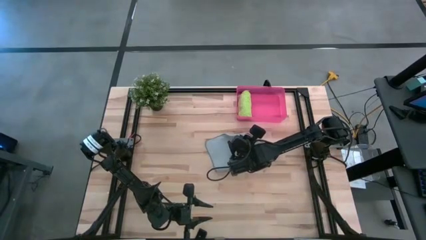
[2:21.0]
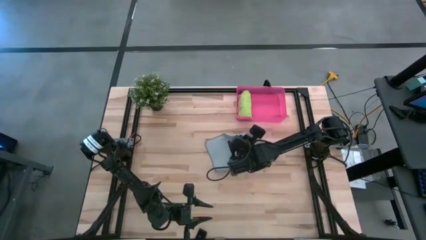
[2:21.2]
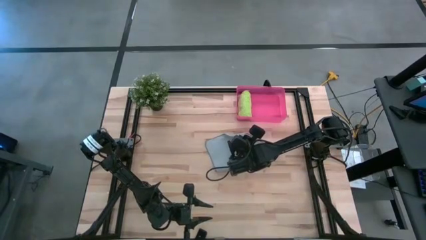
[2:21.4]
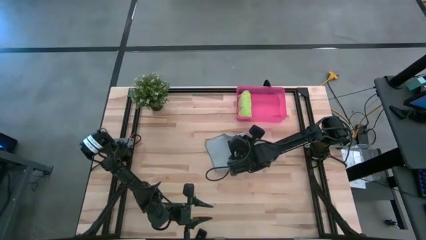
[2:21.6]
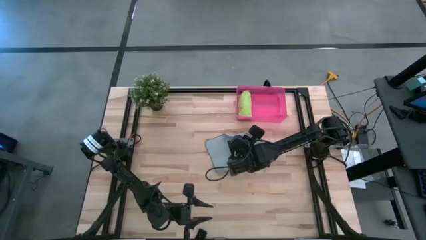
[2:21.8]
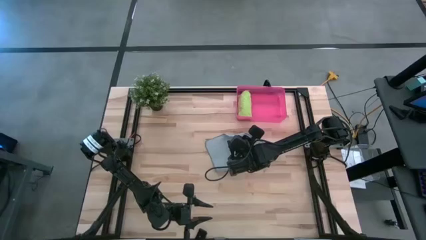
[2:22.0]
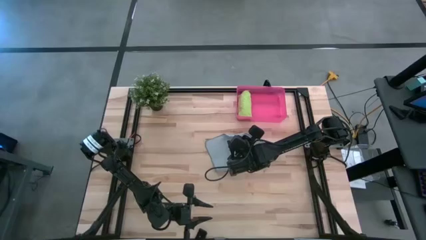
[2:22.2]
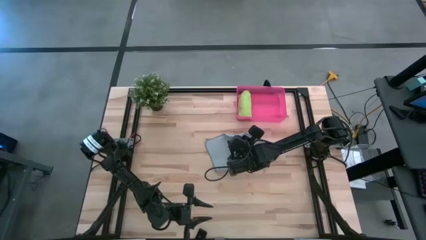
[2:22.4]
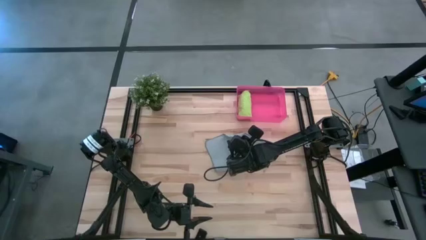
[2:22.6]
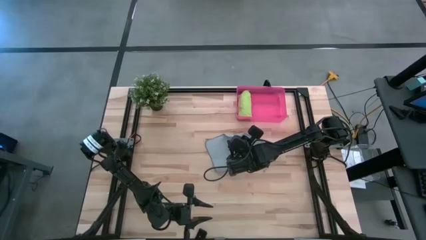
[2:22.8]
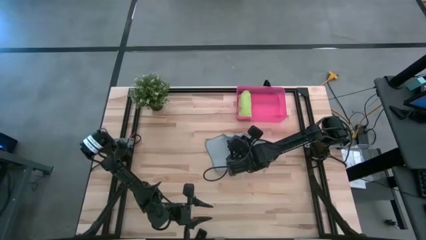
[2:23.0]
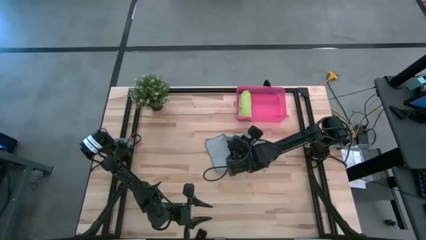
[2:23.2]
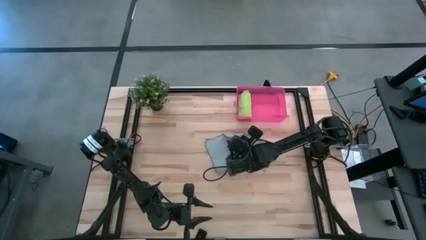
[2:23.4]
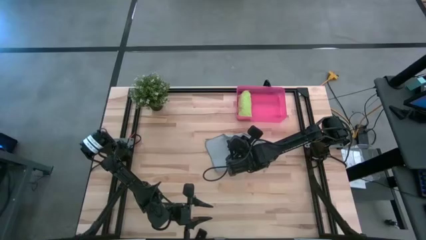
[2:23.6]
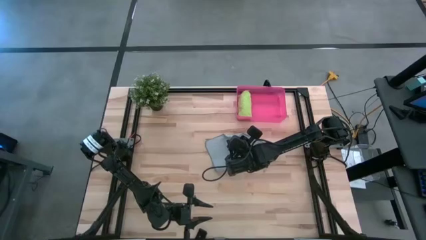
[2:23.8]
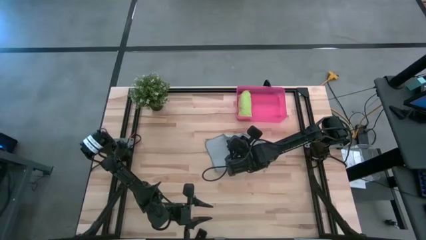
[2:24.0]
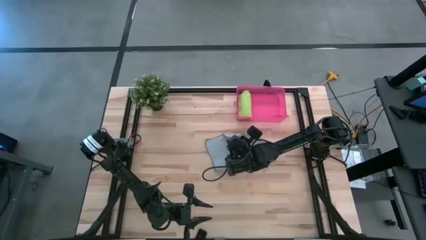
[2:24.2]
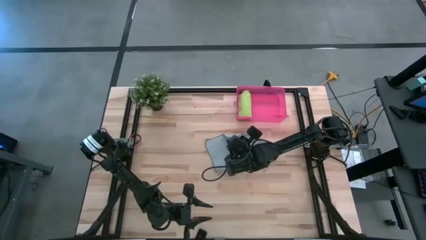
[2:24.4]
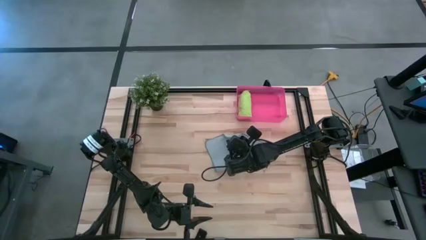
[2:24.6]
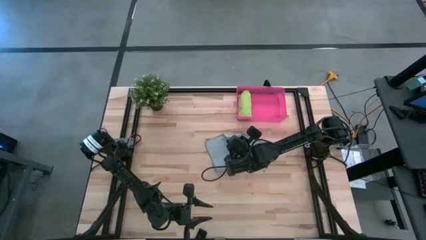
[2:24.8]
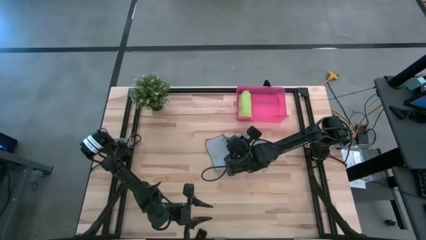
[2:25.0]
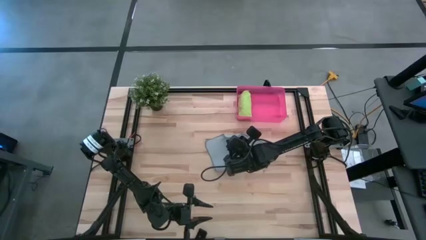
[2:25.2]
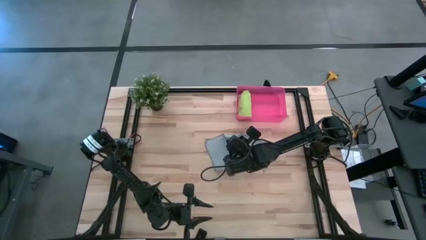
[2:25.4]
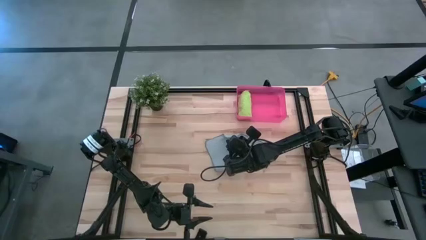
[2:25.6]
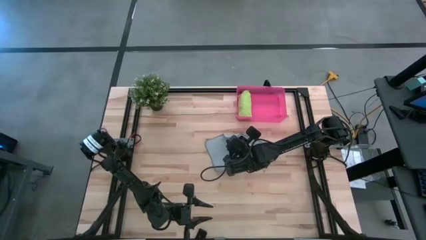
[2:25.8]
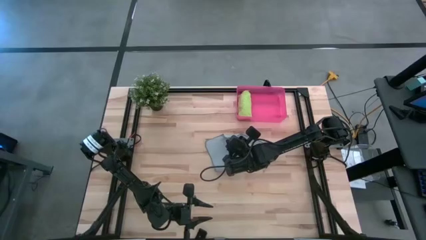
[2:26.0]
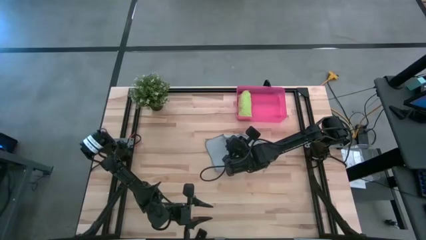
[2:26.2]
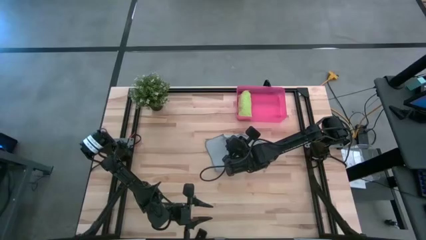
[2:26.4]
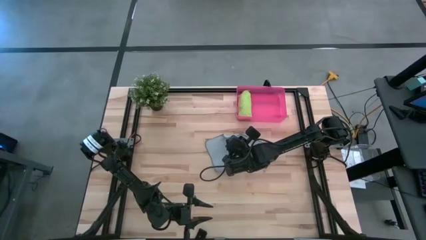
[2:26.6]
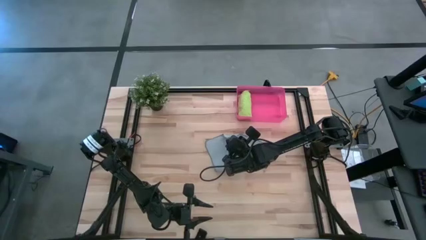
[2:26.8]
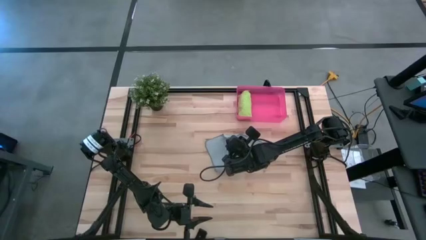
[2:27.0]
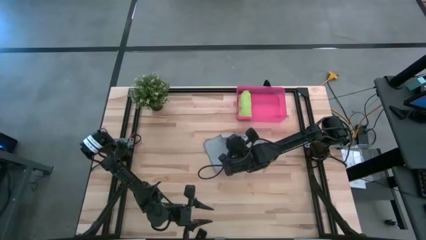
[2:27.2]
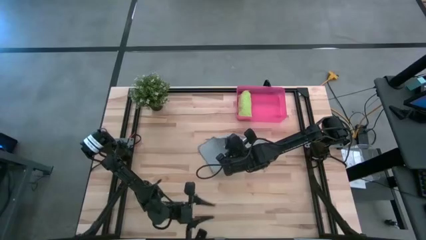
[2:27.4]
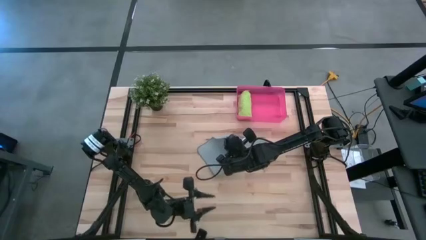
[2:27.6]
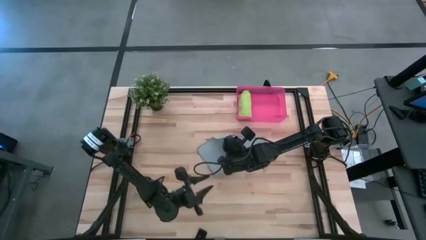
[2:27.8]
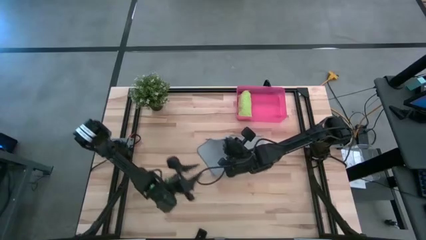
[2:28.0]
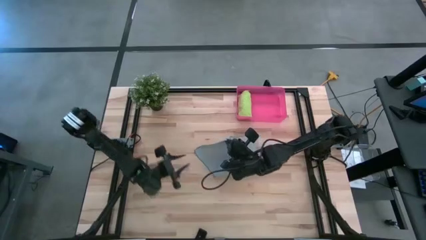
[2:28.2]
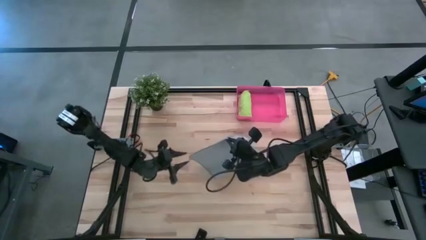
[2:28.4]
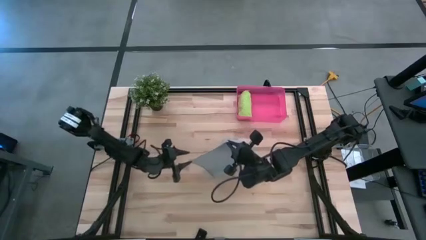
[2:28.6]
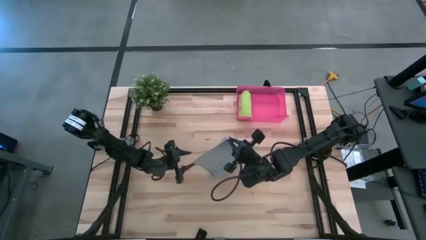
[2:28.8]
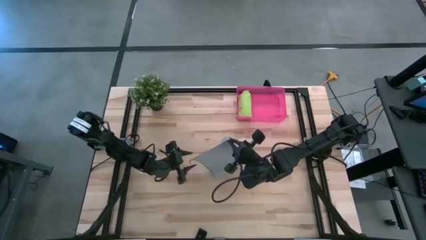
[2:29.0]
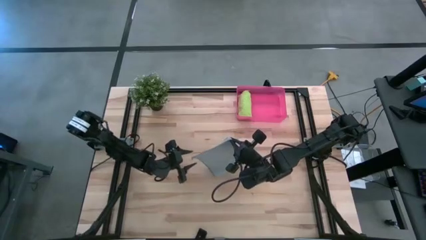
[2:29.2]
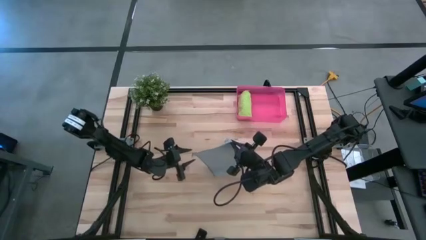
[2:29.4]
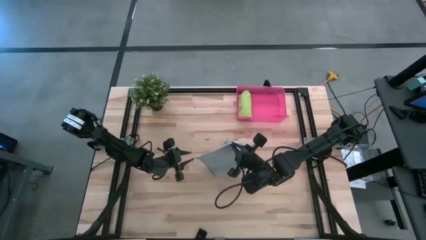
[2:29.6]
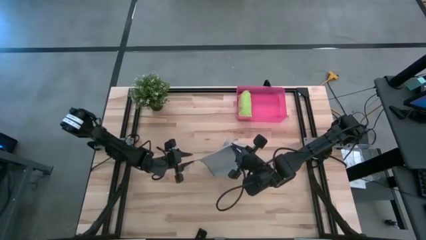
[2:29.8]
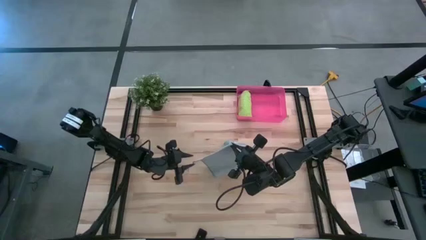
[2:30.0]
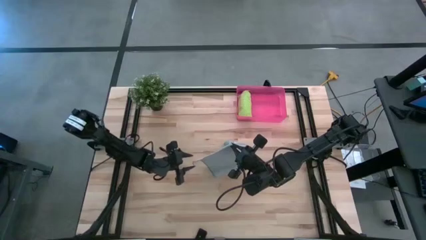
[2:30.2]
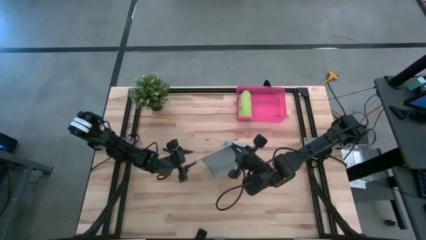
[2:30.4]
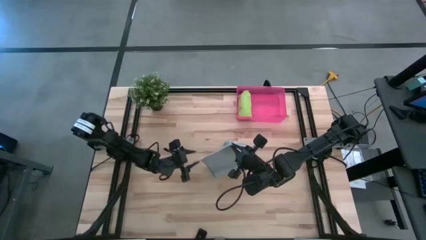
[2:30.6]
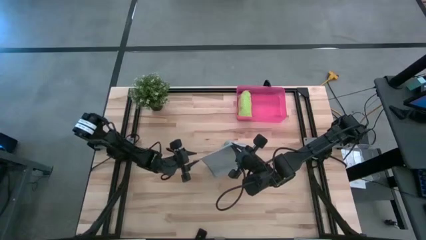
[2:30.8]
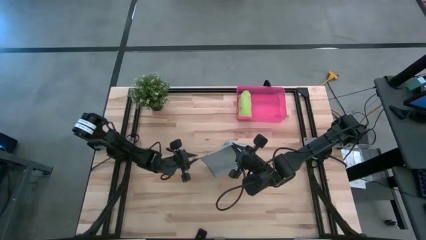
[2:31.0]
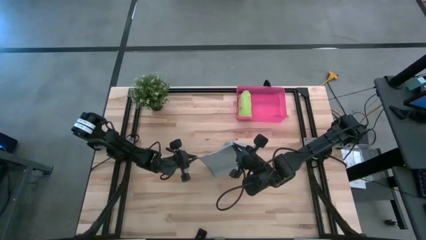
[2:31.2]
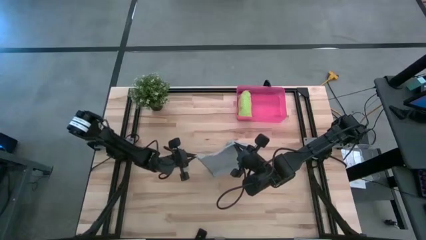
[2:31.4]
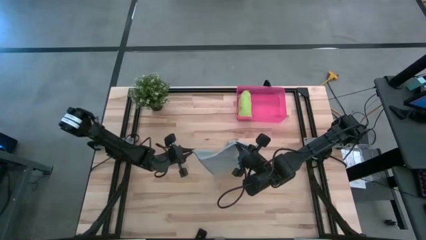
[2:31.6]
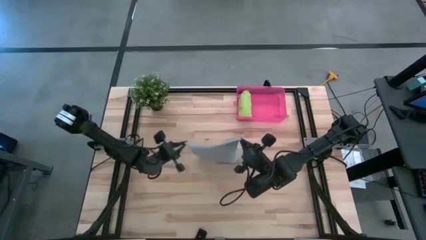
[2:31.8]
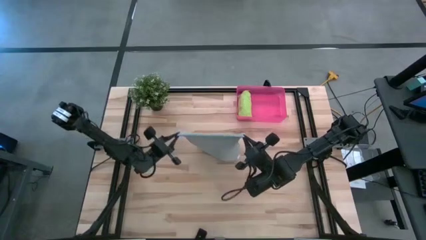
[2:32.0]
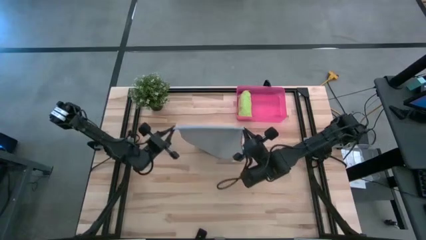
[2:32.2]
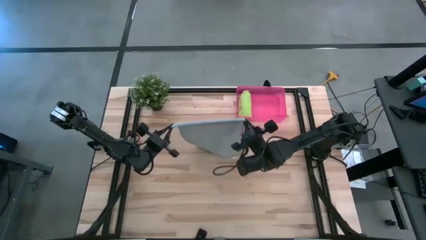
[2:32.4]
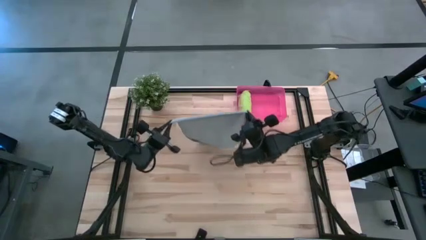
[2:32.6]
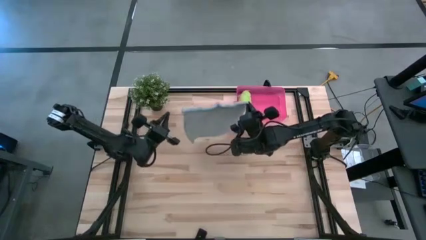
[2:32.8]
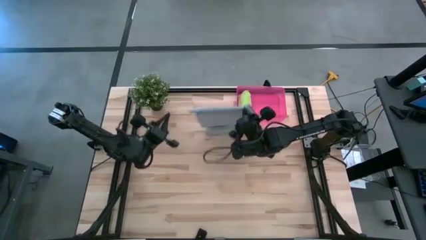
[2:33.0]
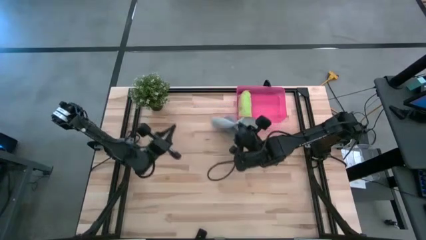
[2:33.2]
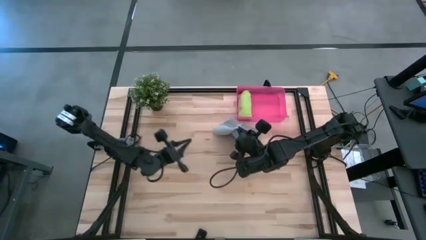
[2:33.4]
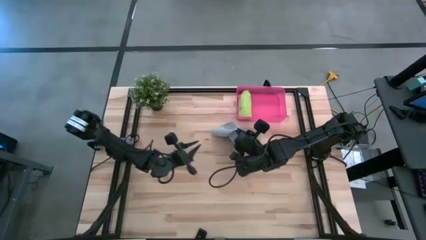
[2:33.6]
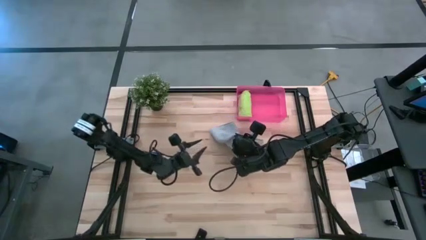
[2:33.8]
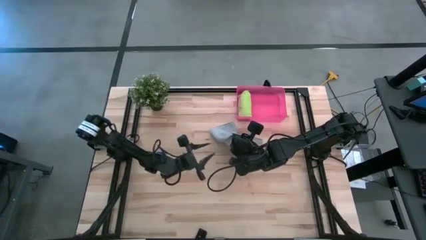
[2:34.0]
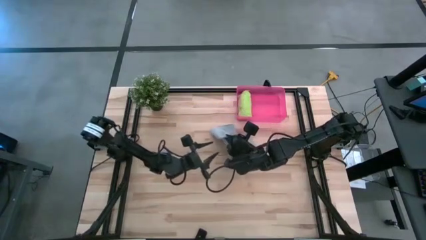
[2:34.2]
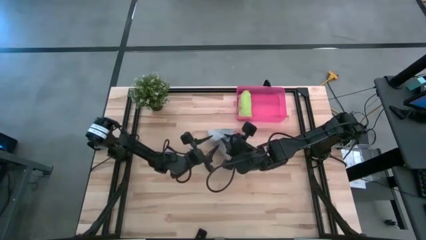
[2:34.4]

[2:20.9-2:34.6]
Task: Roll microfiber towels into tight, uniform cylinder then place into a basket
Fold the gray microfiber cloth
